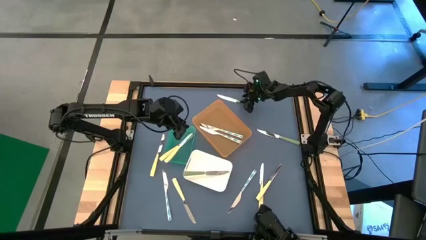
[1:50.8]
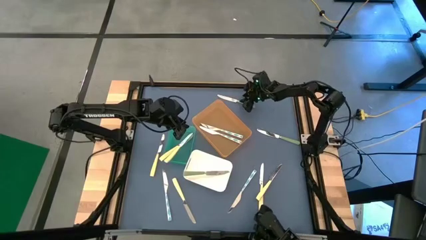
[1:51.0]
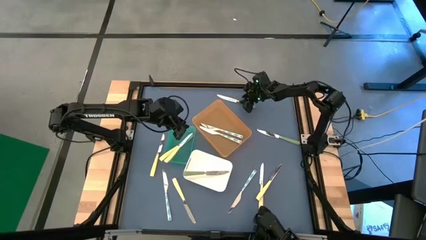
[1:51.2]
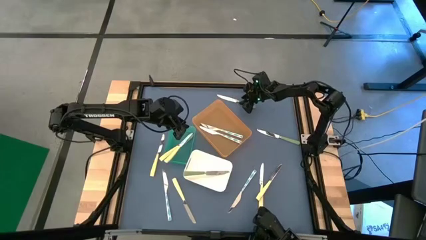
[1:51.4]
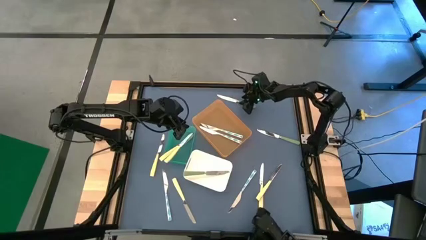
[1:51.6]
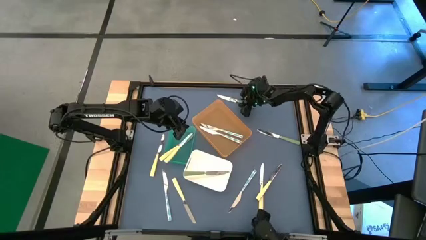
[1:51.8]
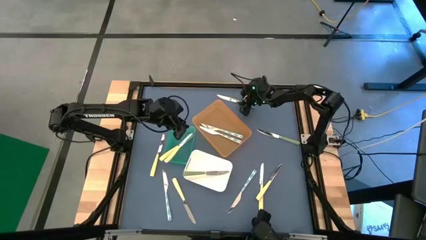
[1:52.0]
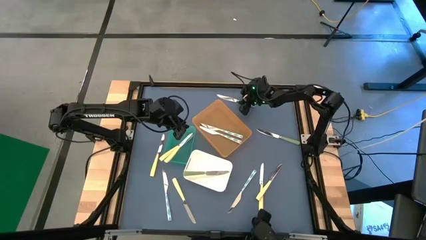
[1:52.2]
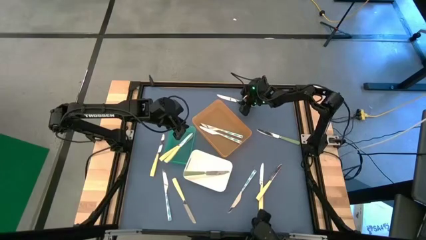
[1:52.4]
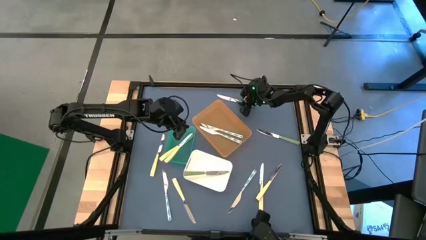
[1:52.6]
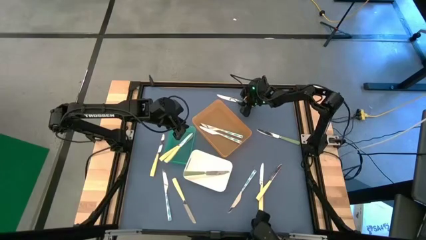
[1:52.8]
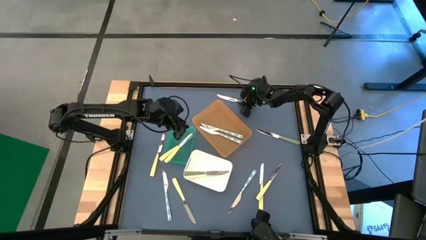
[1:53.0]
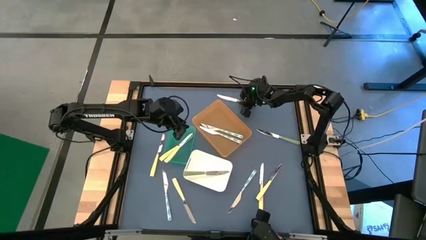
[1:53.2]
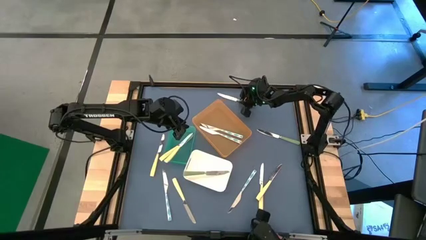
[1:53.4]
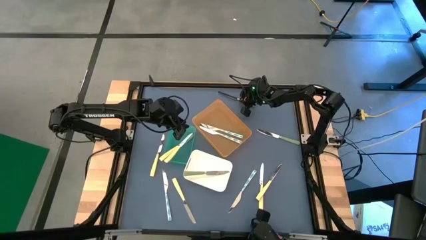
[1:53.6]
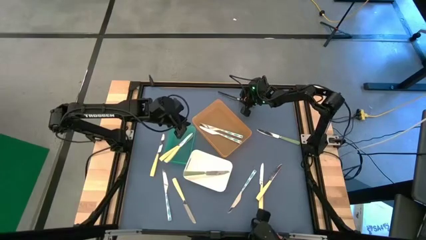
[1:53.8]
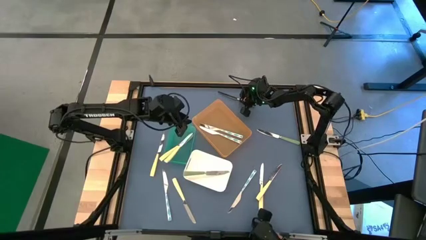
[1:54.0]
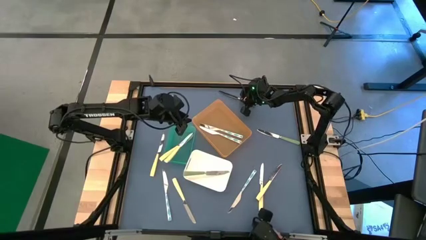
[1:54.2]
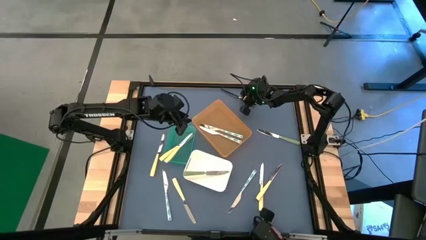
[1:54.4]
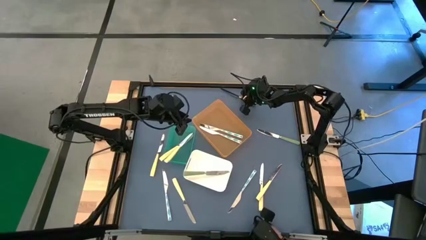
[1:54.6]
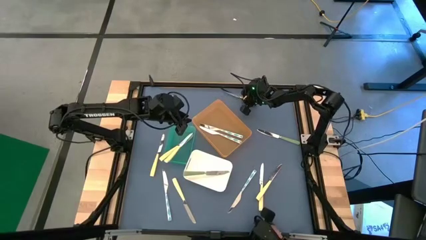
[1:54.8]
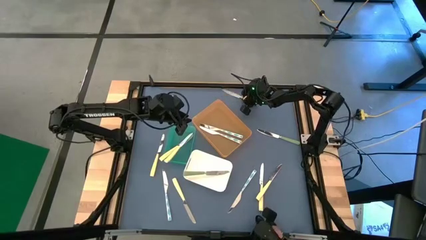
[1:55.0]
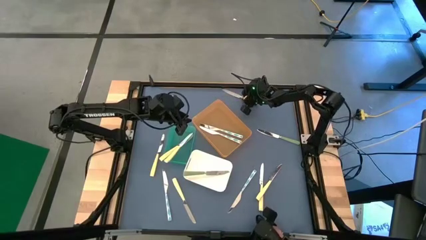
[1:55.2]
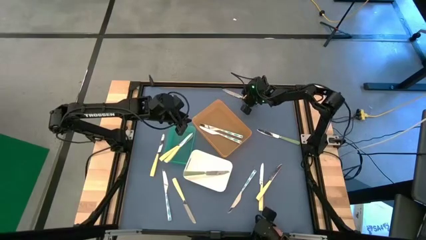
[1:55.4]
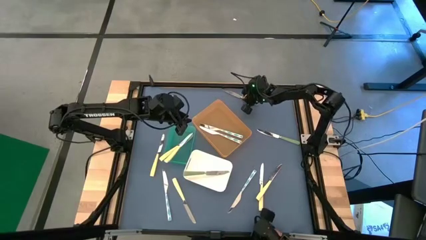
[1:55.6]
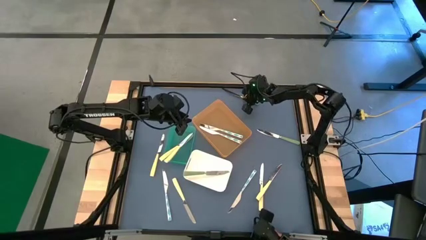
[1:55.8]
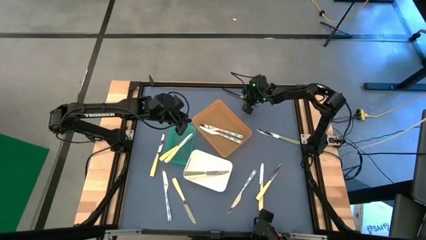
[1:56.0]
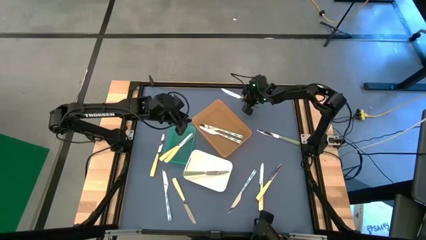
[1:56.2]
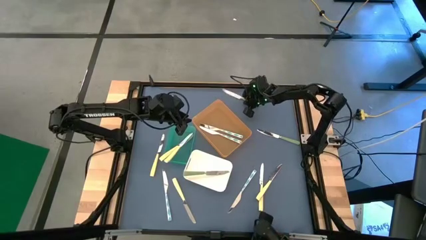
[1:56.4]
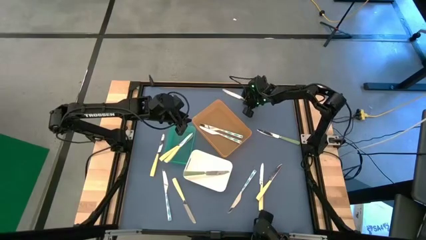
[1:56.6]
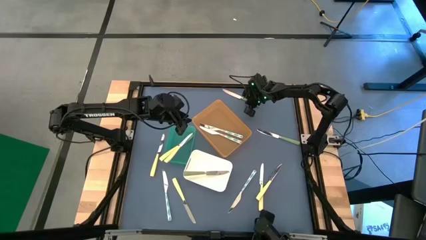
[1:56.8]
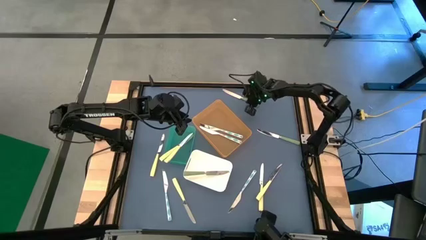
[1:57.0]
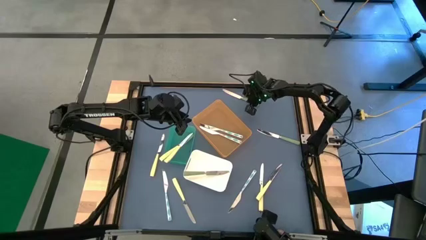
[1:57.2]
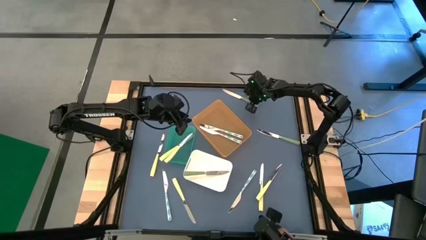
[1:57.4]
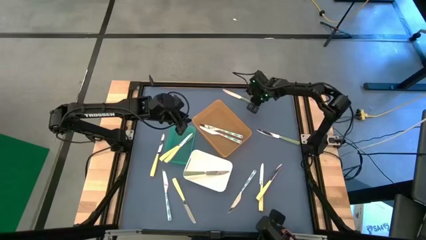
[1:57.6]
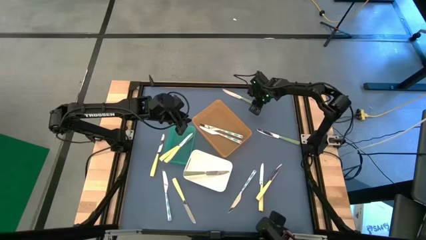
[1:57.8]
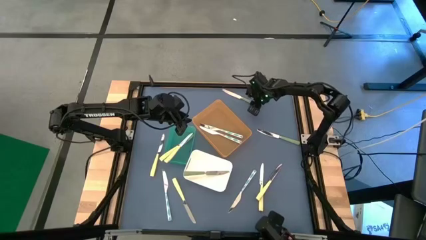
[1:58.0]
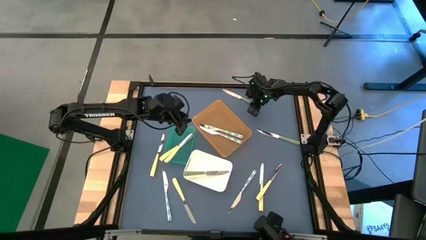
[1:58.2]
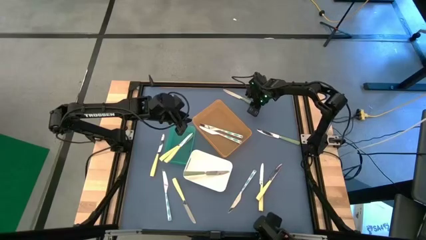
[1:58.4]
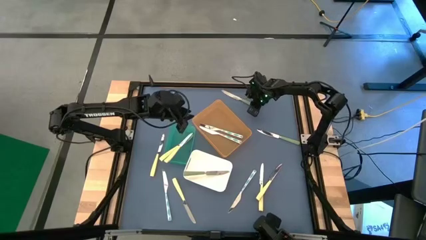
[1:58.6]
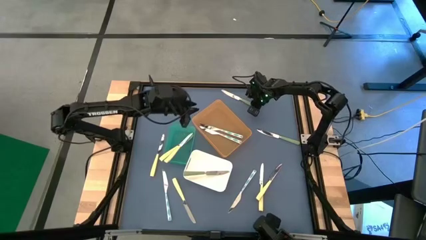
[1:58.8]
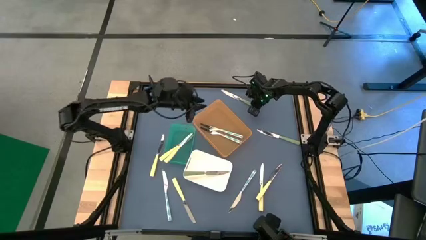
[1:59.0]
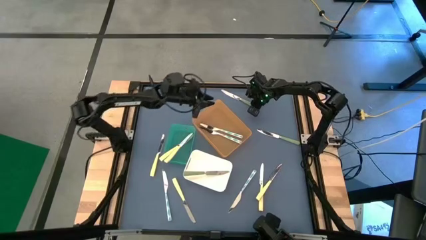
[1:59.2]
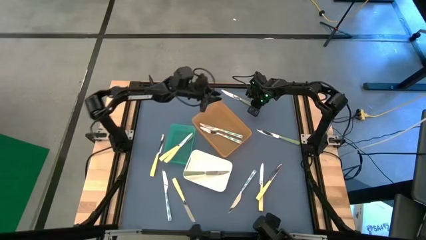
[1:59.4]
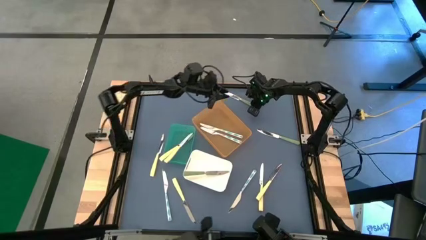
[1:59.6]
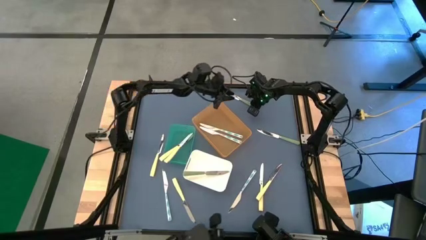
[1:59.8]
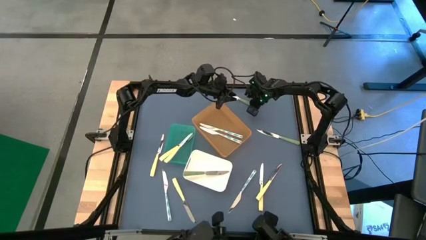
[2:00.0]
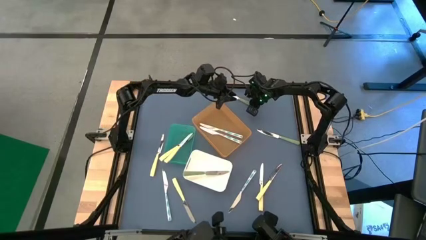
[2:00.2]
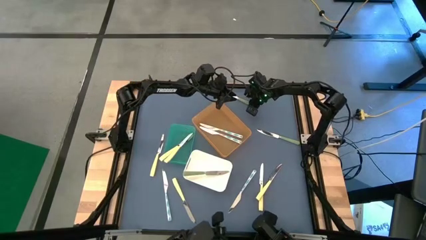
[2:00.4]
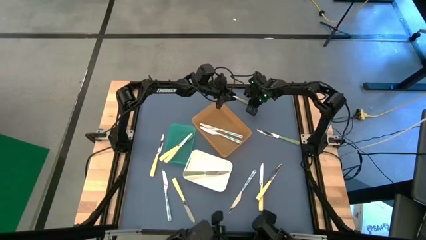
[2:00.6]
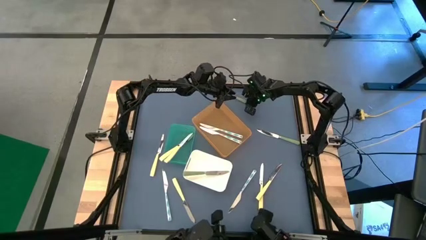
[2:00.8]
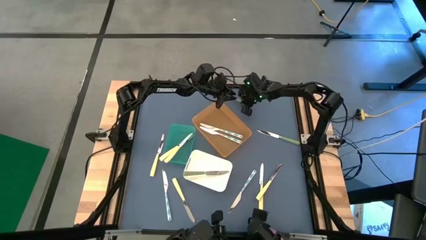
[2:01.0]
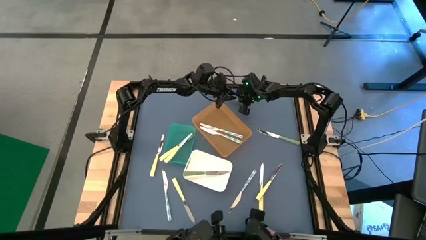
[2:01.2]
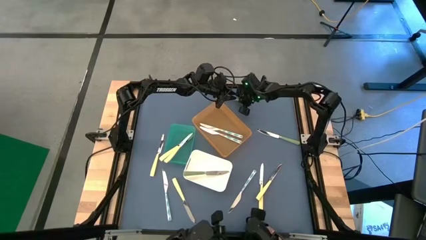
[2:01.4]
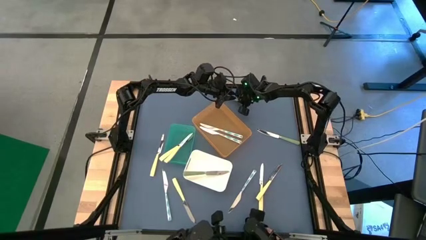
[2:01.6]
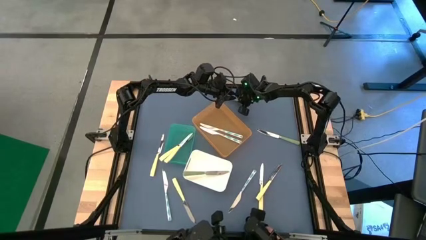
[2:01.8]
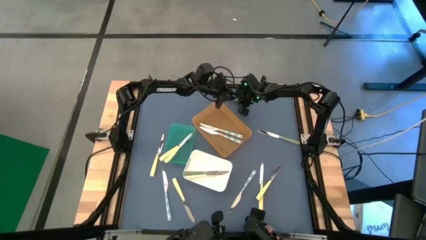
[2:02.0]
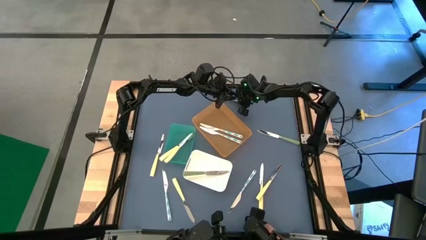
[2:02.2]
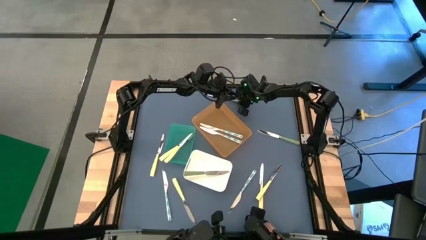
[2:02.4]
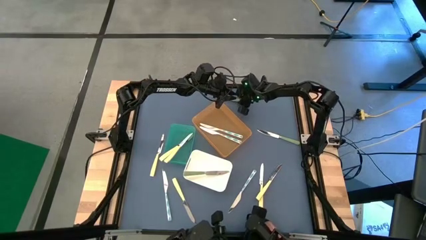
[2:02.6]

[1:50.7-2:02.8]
Task: Sort silverware by color (type)
Put the green table knife into the white bin

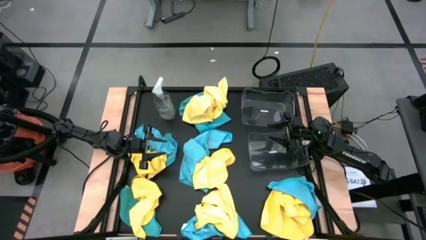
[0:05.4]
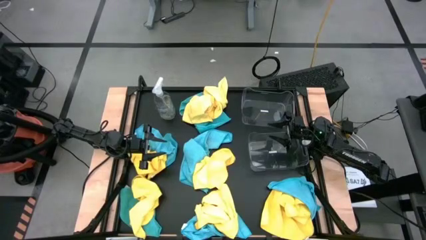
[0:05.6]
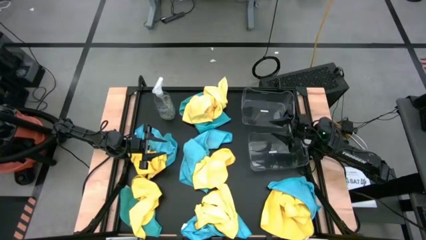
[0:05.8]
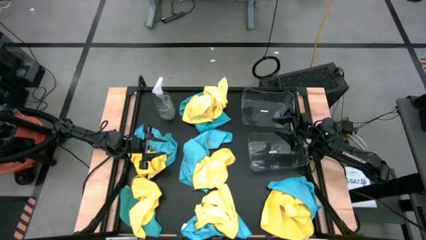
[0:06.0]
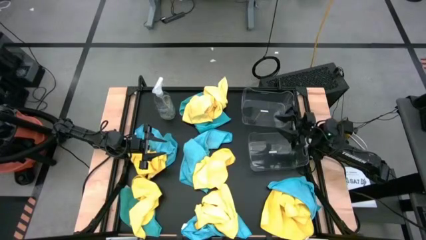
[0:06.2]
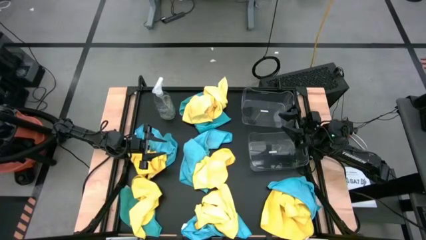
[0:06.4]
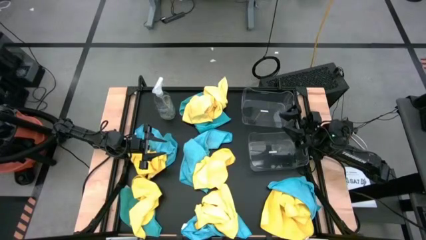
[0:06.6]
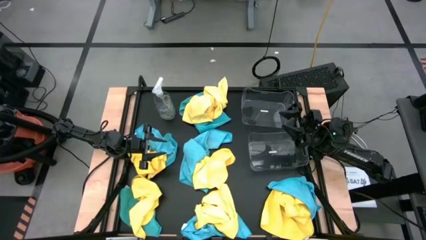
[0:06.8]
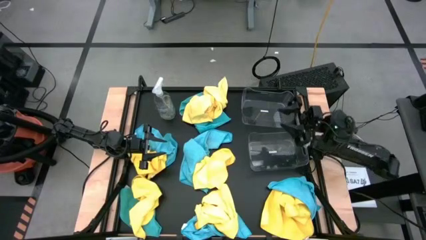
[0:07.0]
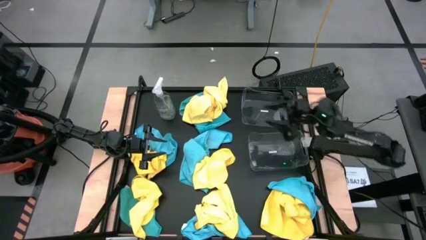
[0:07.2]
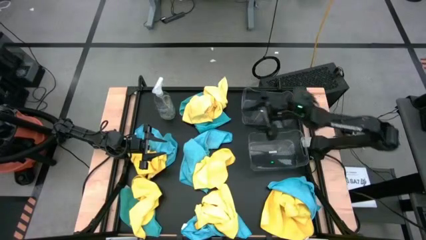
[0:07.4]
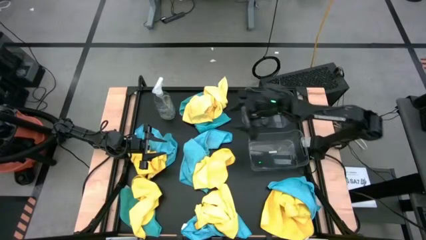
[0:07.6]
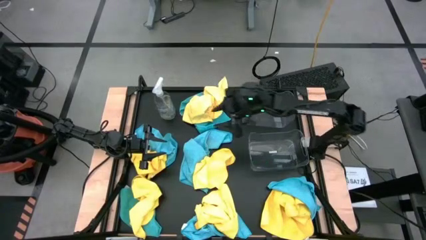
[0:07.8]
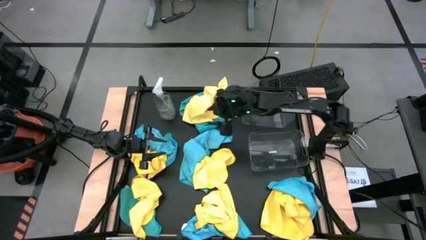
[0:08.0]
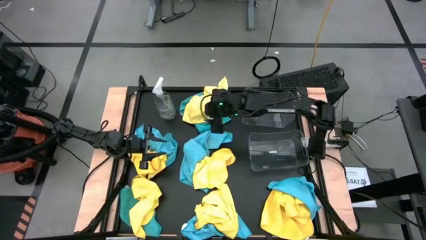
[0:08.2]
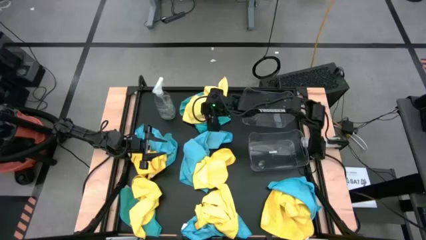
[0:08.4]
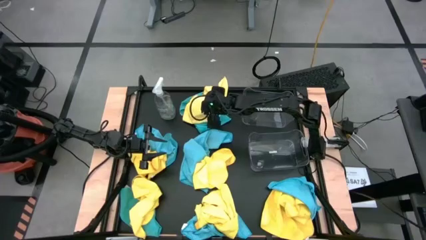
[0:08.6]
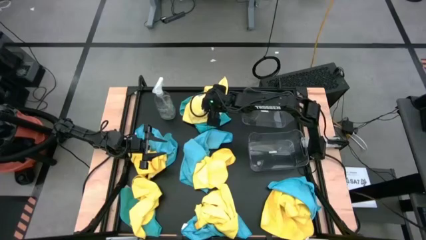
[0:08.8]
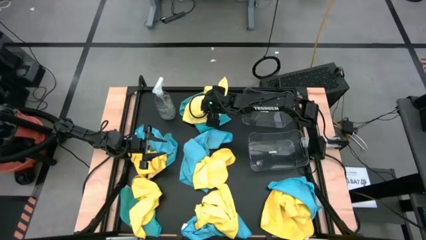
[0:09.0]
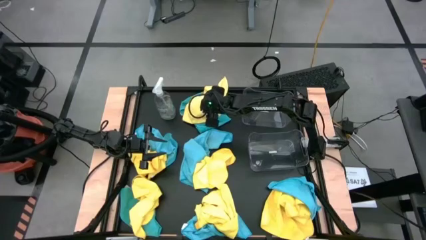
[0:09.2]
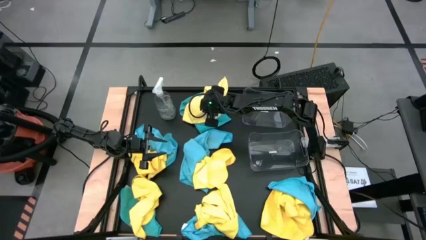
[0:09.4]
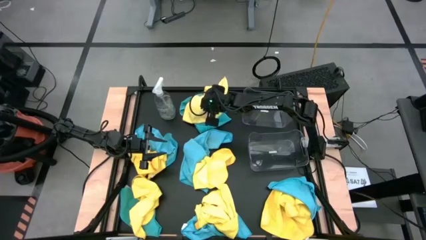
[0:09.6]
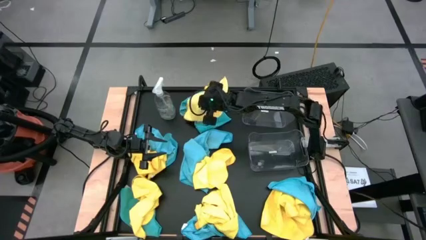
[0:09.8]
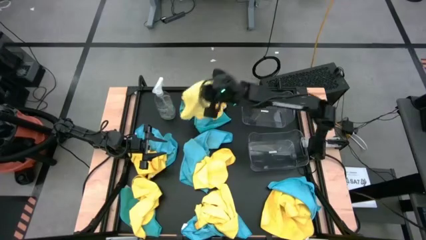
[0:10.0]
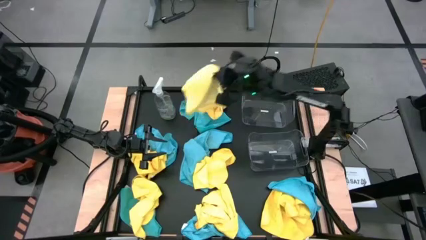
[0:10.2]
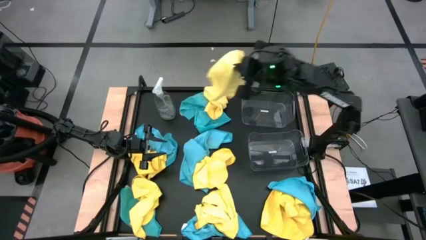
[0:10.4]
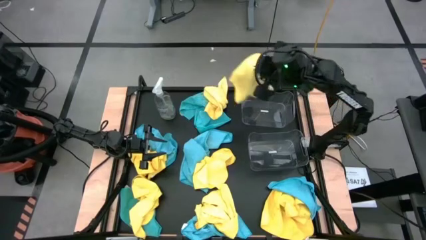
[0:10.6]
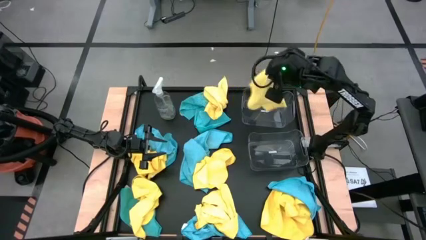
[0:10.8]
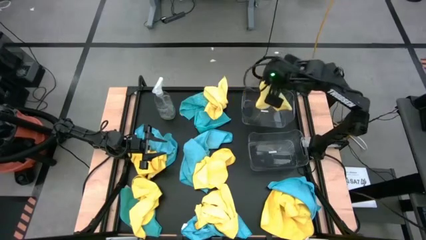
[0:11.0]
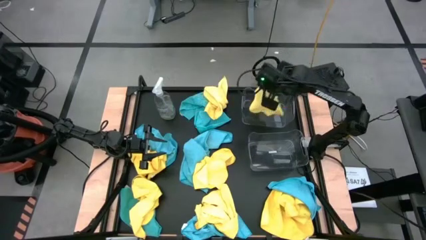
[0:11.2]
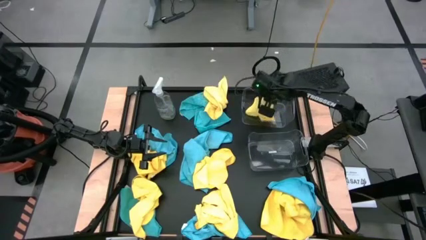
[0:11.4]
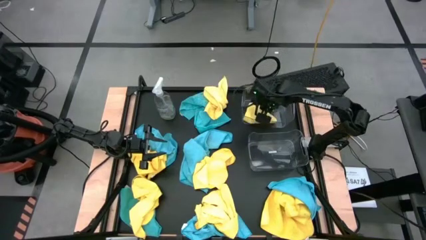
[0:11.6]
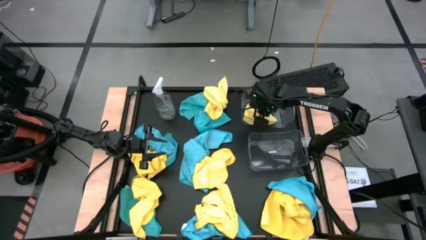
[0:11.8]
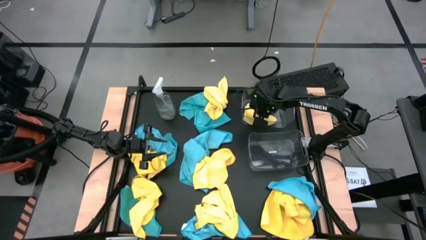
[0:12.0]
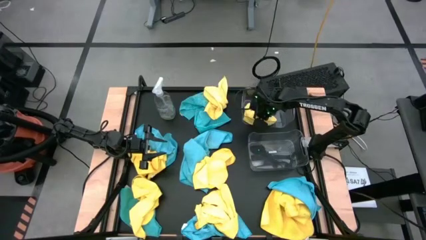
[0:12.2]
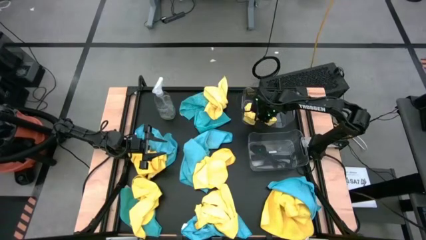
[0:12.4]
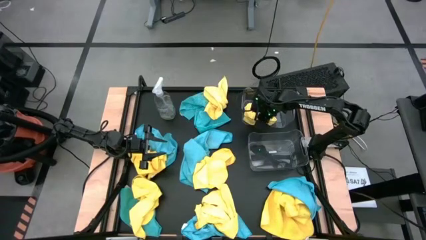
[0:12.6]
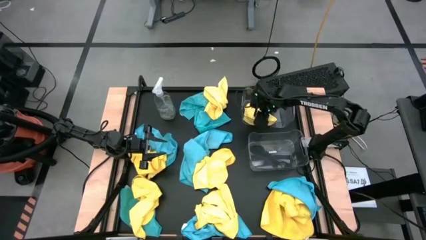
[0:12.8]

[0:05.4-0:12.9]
Task: Sort microfiber towel by color & place in baskets
Put the yellow microfiber towel into the top transparent bin
